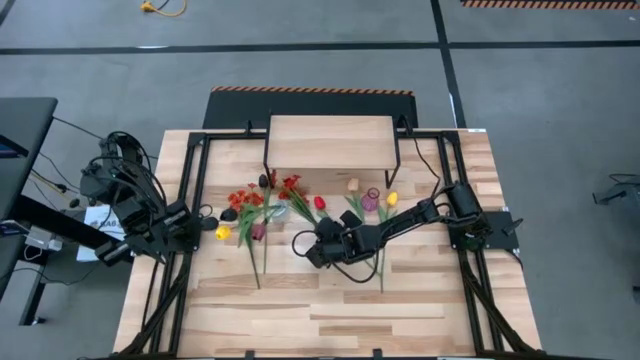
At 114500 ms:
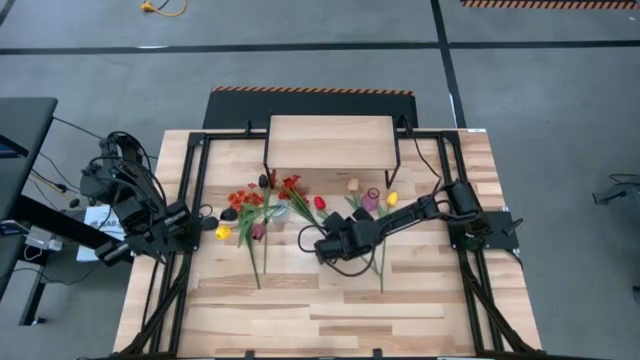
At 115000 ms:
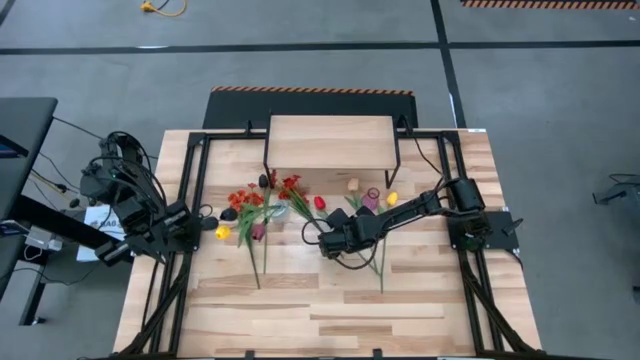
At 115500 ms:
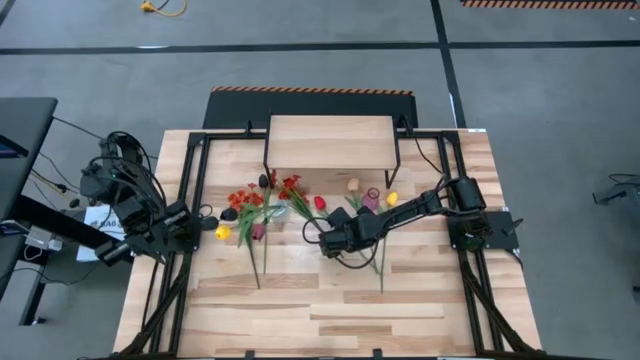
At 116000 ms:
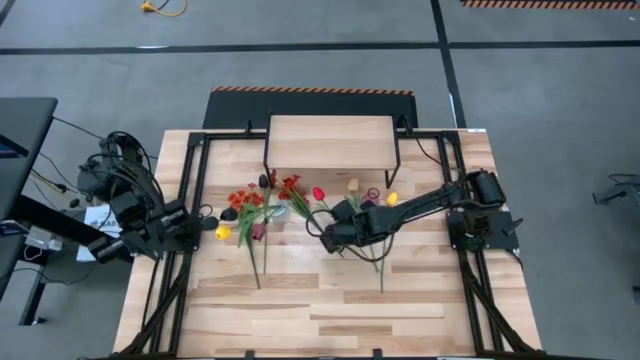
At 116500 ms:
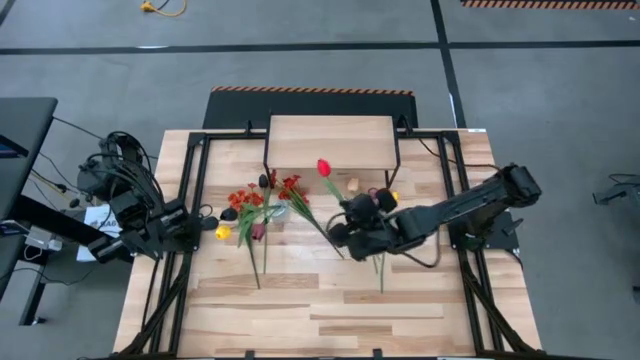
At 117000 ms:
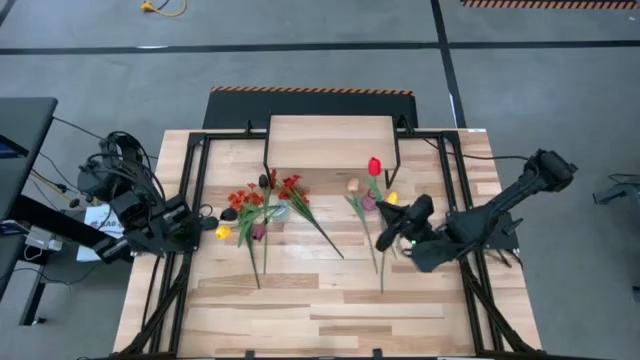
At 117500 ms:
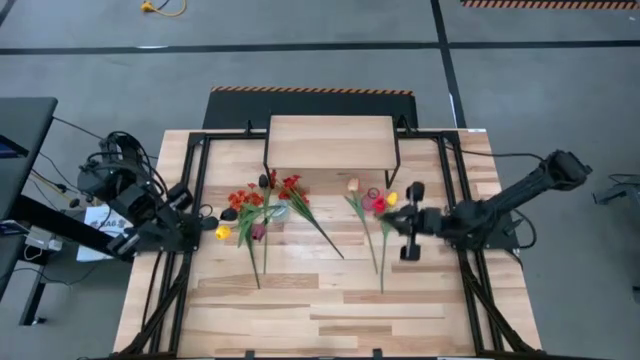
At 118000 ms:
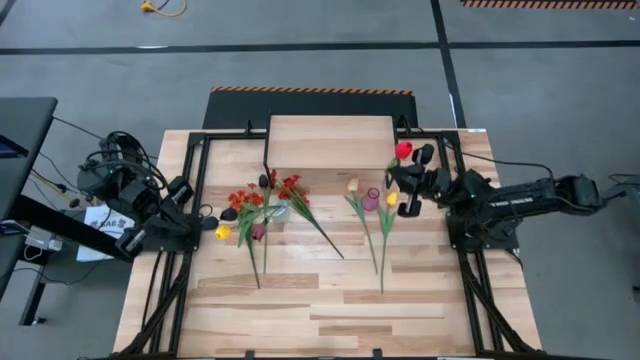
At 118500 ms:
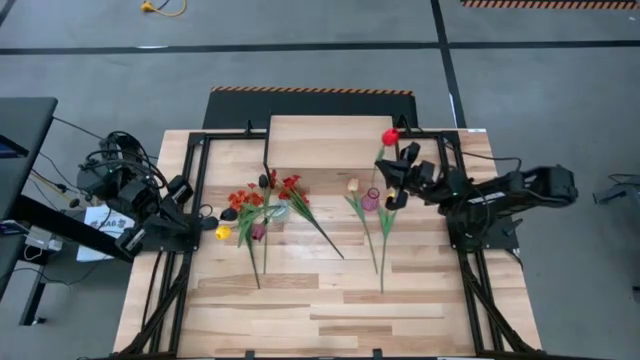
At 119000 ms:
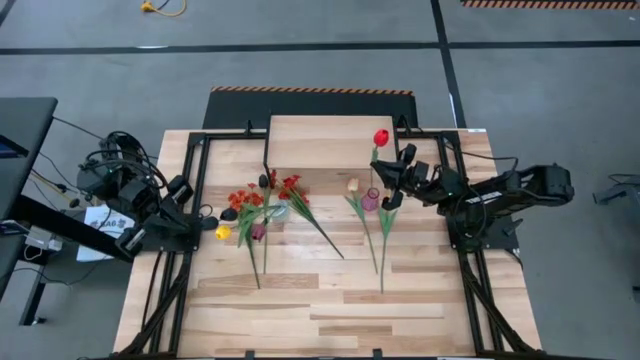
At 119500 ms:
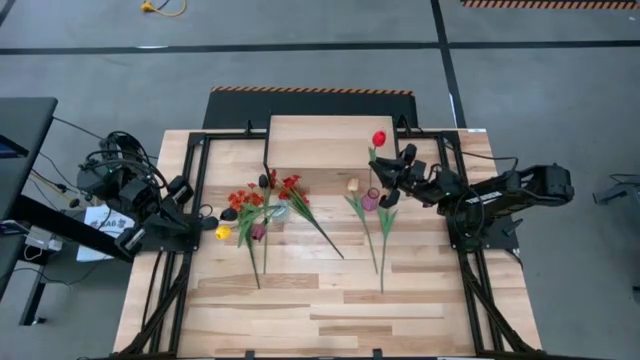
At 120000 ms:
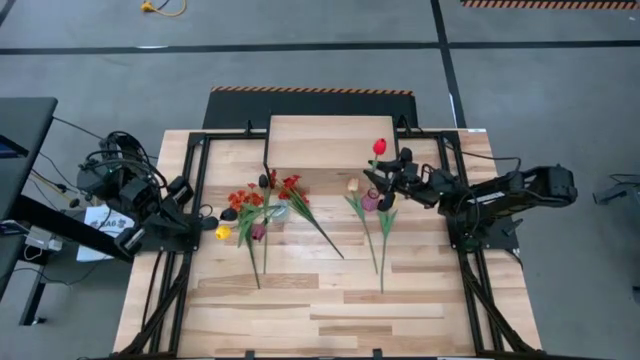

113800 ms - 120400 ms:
Task: Pick and place flowers into a vace then onto a shelf
Put the red flower into the purple vase

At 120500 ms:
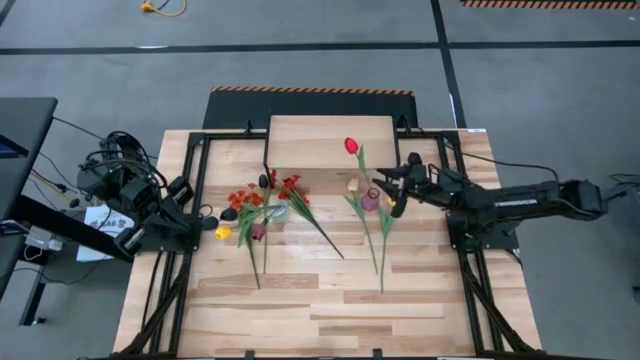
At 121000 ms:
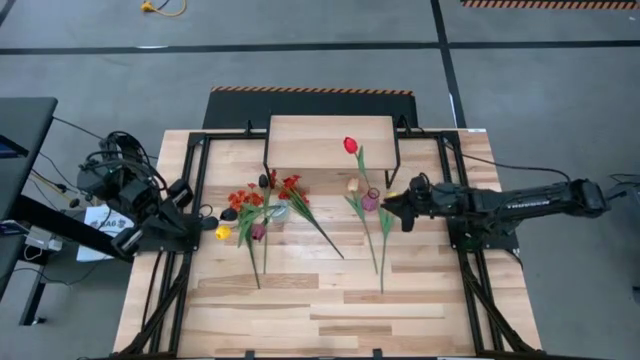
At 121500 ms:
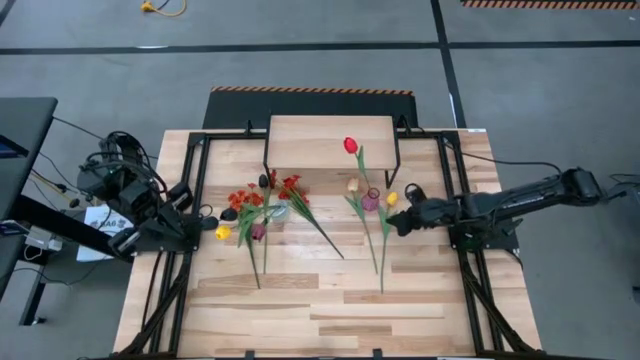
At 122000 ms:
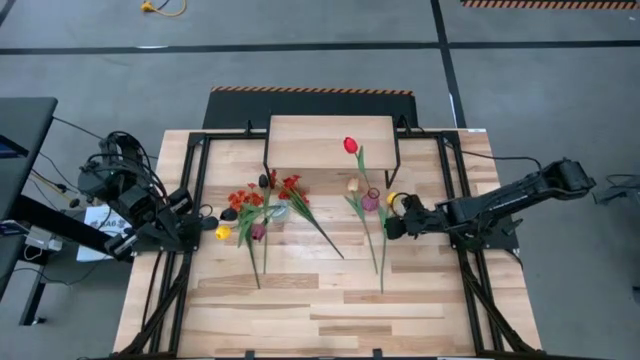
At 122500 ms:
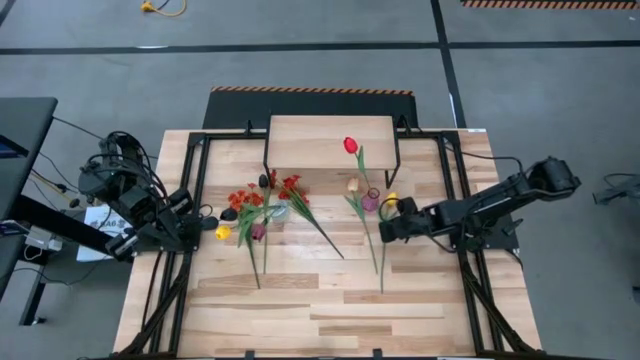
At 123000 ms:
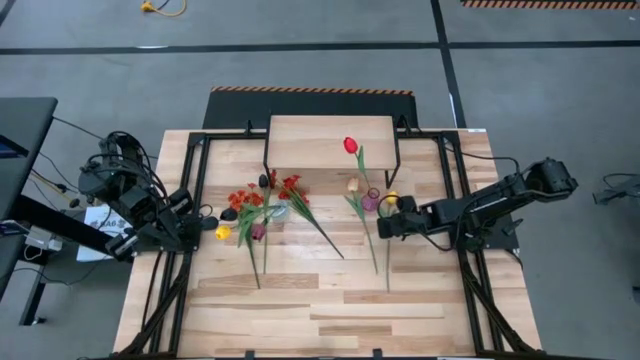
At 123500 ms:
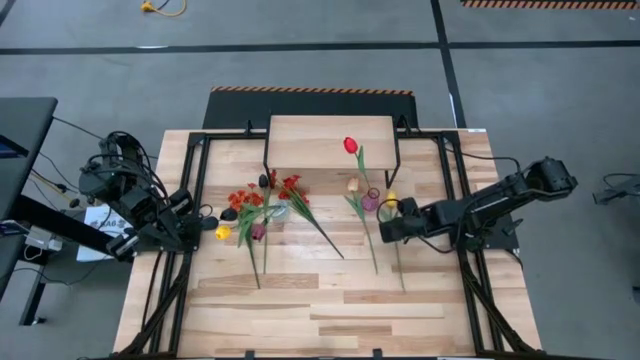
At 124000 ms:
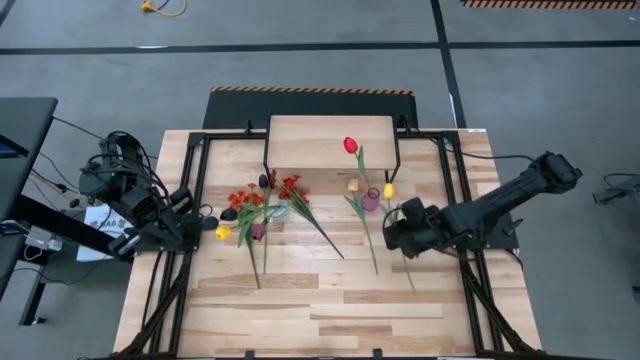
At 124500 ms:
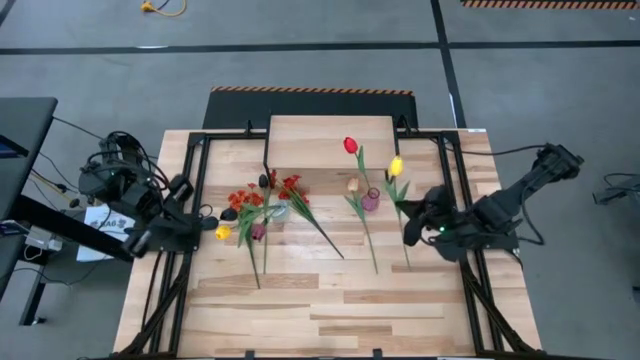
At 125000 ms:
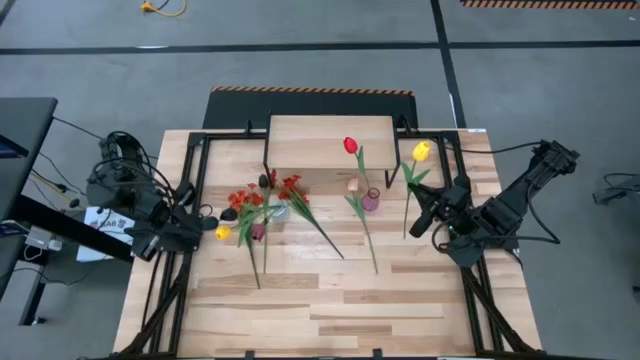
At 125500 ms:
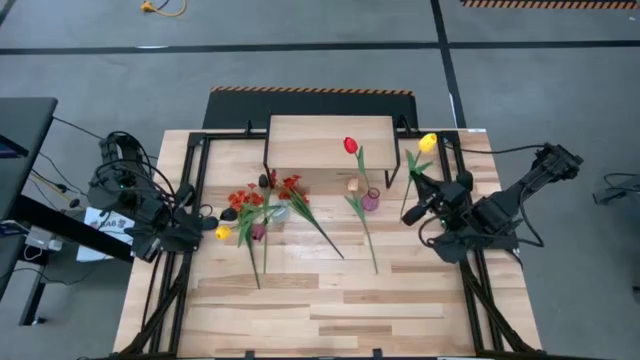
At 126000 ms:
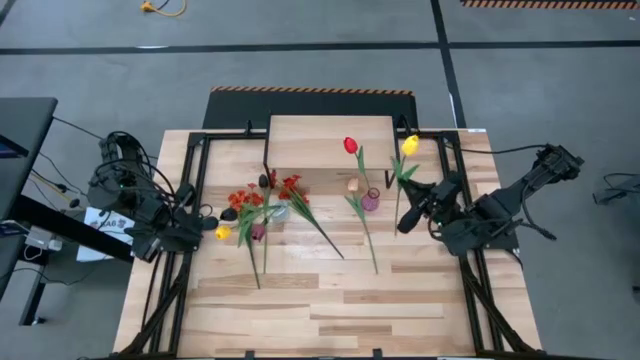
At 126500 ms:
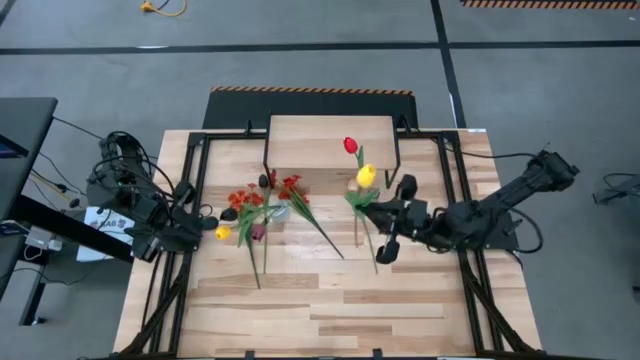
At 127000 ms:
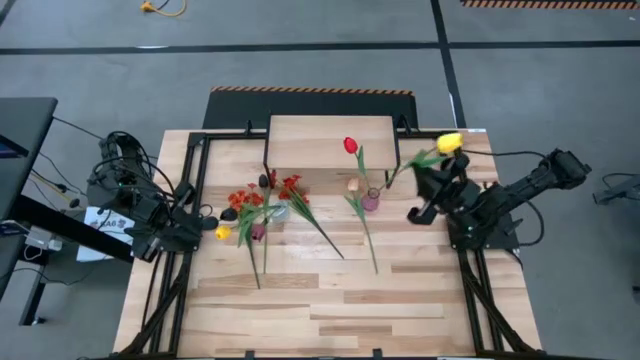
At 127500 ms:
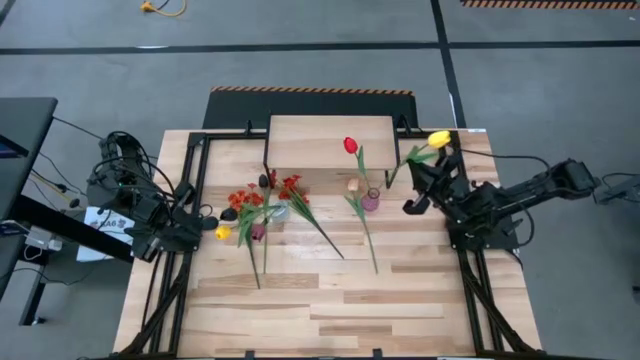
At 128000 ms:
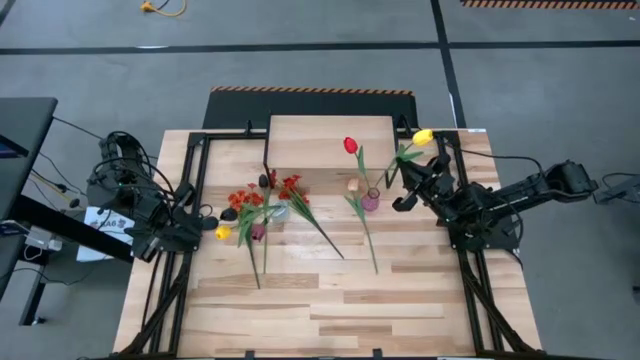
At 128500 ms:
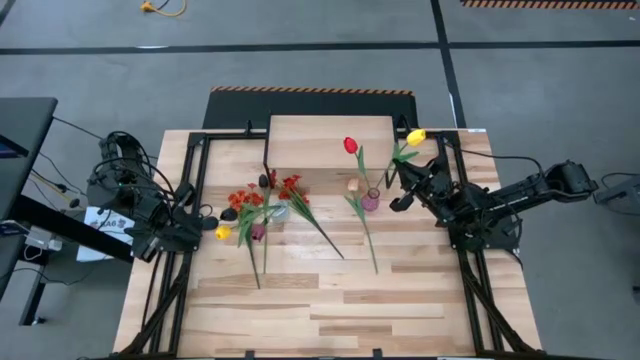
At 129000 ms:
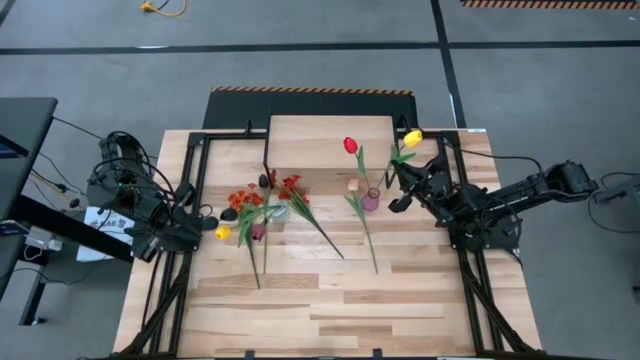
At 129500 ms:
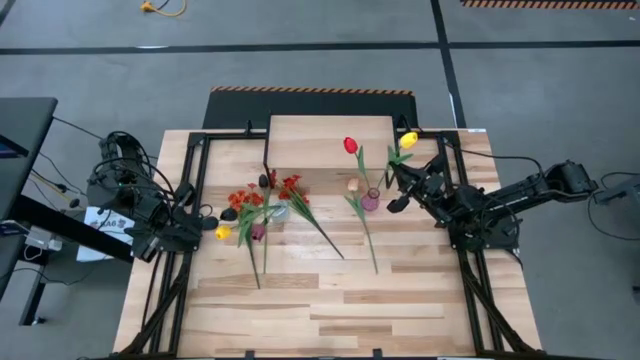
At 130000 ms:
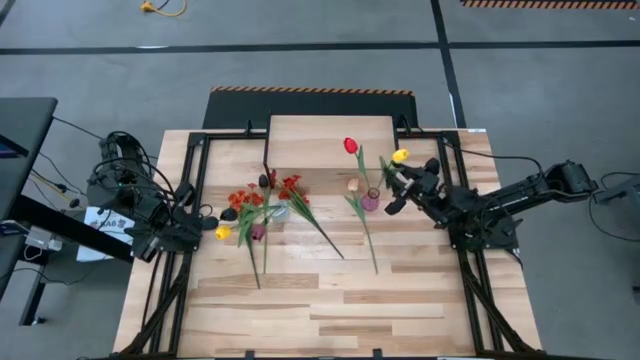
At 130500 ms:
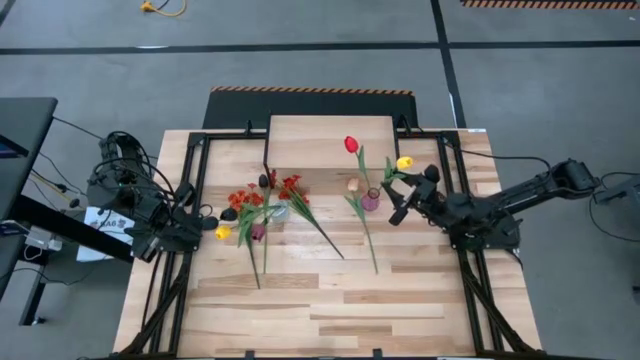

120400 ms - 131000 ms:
Put the yellow flower into the purple vase

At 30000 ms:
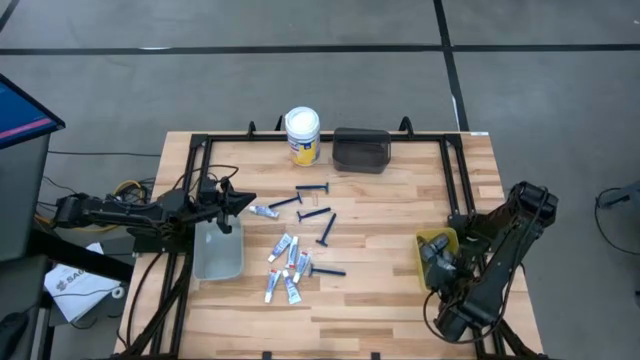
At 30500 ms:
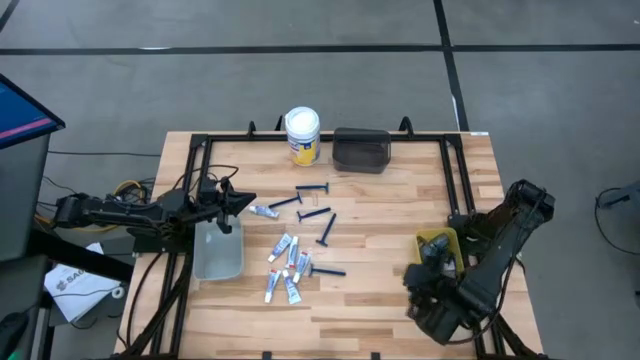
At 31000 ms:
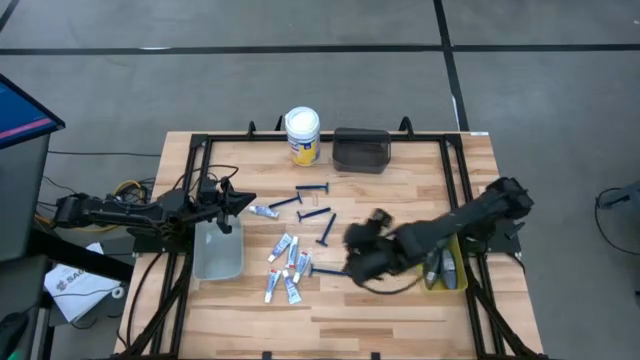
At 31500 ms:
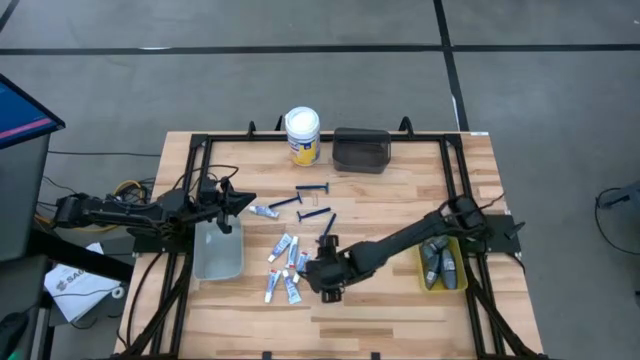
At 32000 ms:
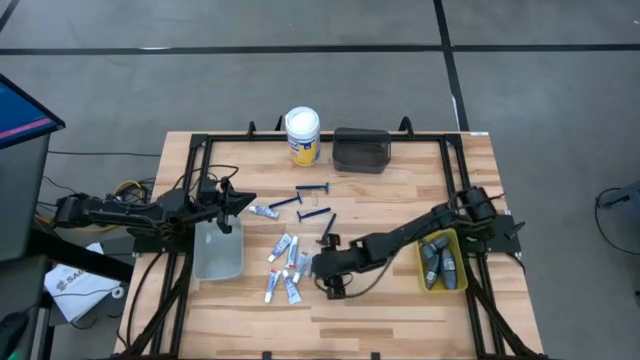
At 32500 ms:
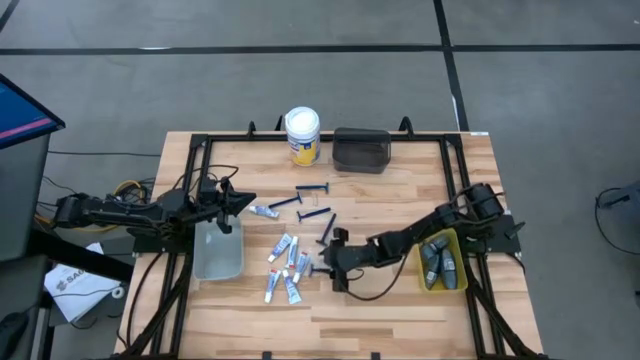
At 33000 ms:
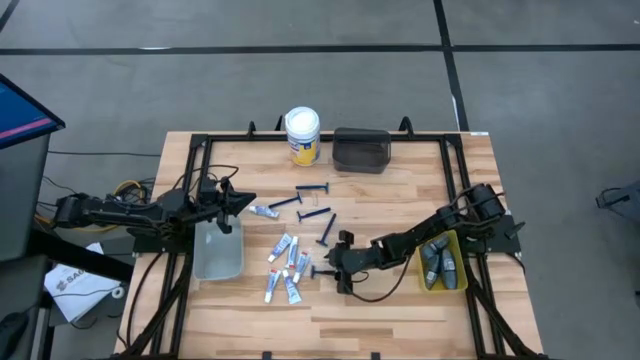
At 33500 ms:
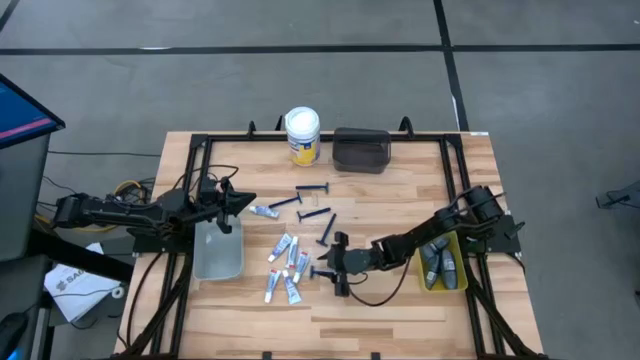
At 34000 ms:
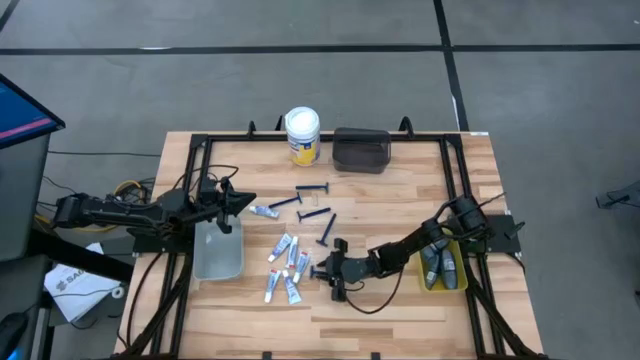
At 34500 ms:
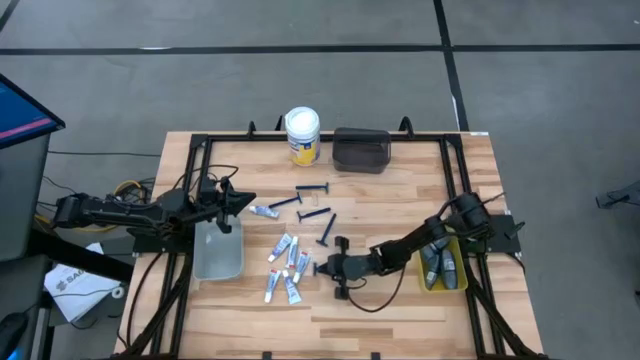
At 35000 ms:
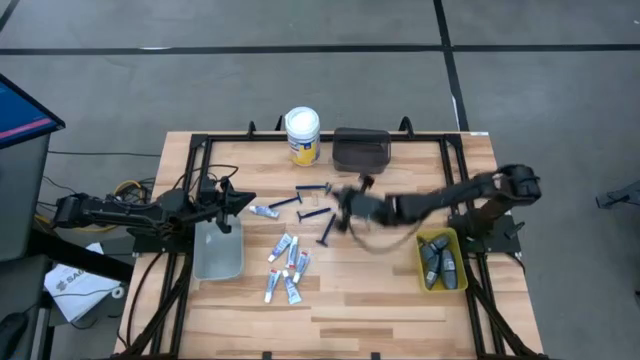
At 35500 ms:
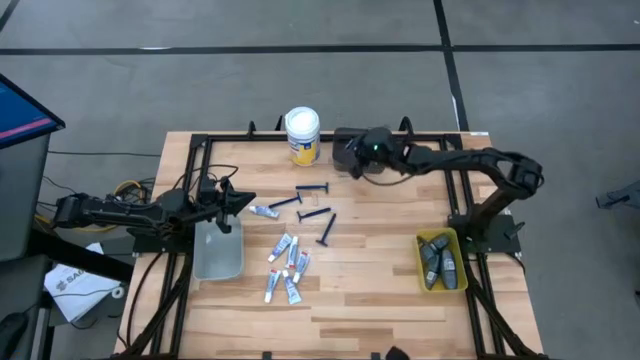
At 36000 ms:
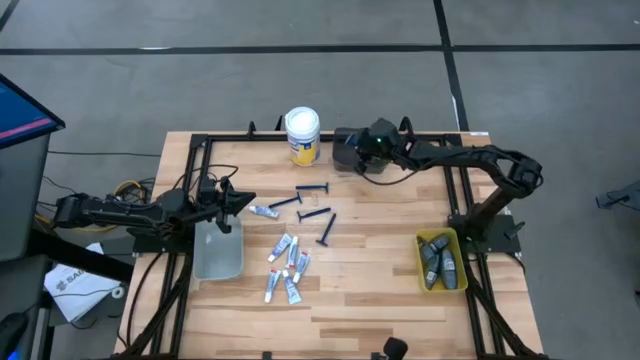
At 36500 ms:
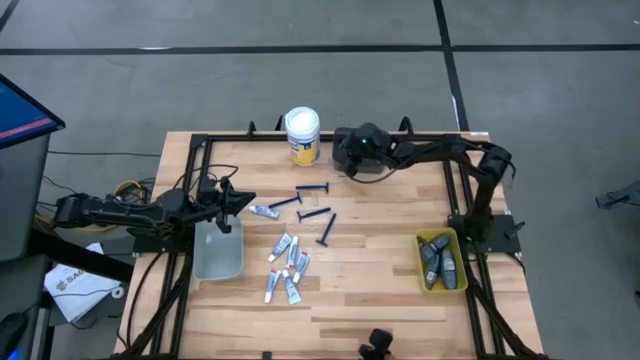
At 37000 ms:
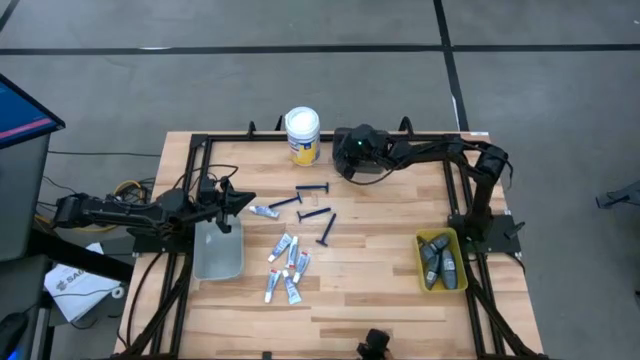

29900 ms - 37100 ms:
Task: Pick & Place Travel size toiletries
Put the blue razor into the black bin
